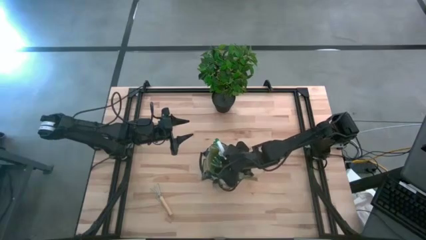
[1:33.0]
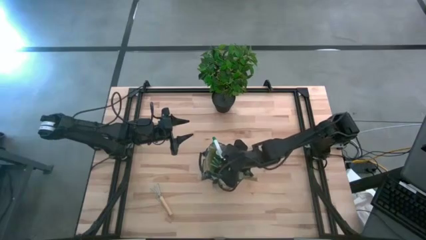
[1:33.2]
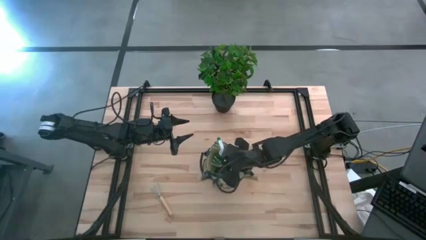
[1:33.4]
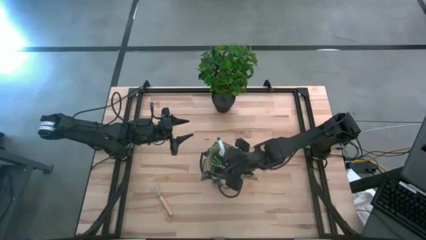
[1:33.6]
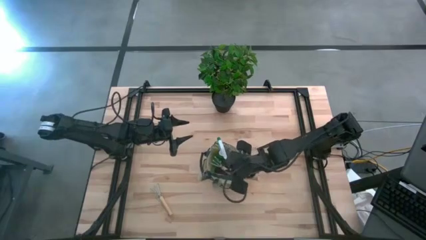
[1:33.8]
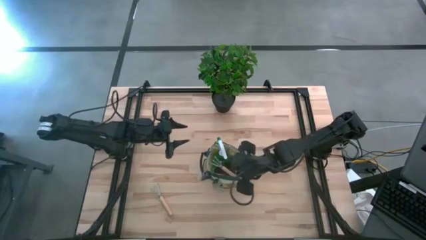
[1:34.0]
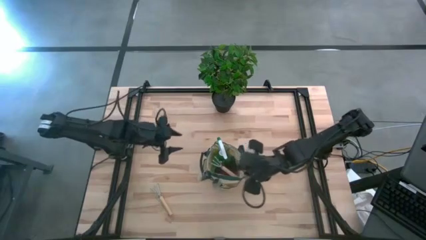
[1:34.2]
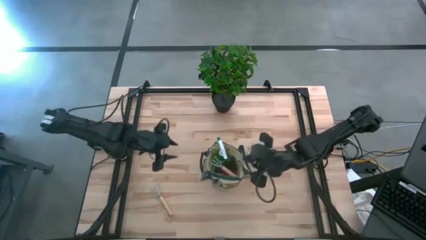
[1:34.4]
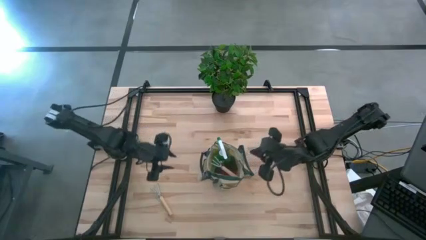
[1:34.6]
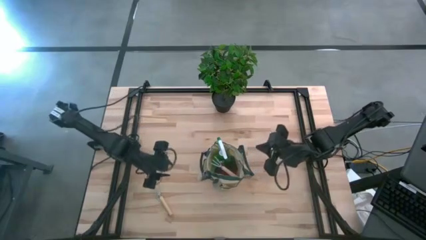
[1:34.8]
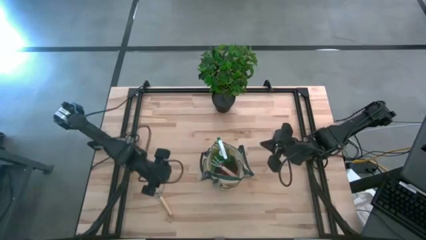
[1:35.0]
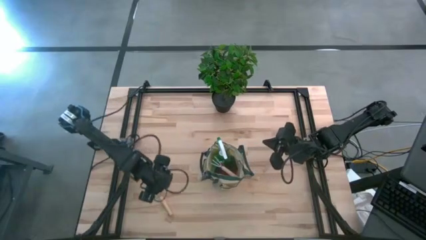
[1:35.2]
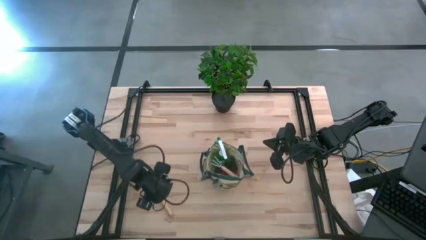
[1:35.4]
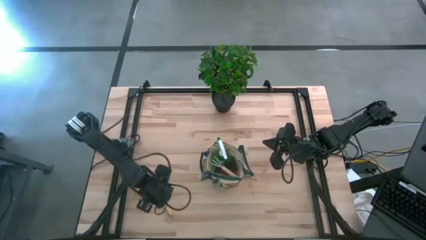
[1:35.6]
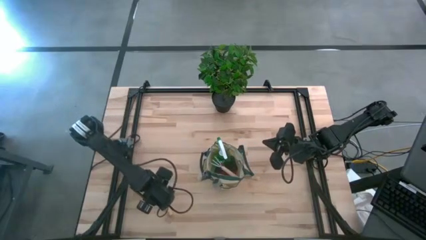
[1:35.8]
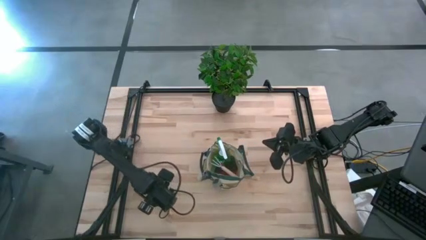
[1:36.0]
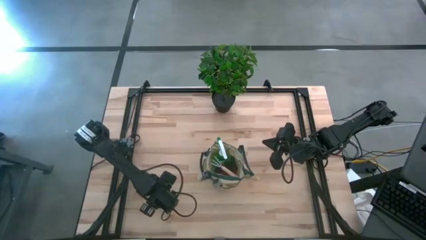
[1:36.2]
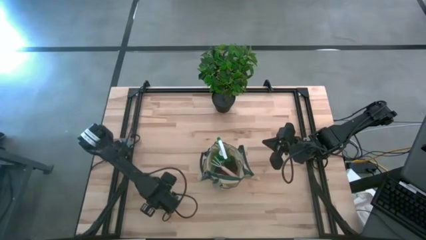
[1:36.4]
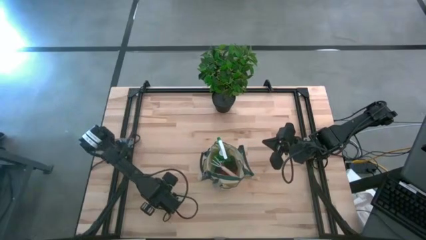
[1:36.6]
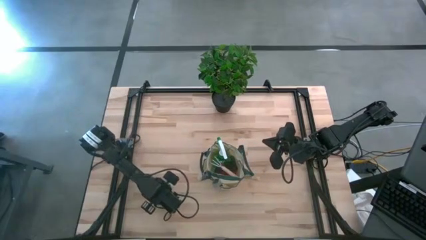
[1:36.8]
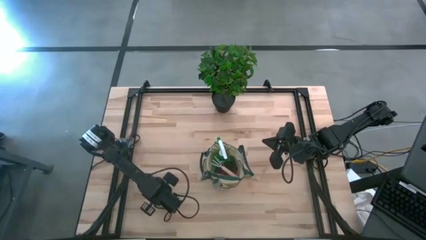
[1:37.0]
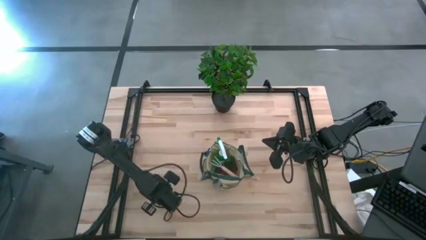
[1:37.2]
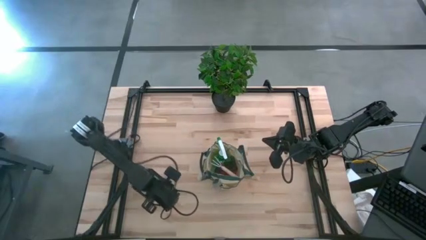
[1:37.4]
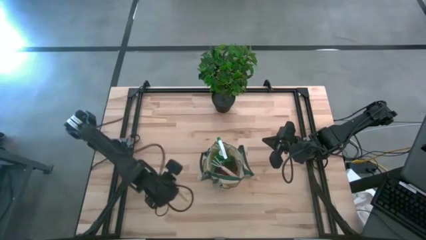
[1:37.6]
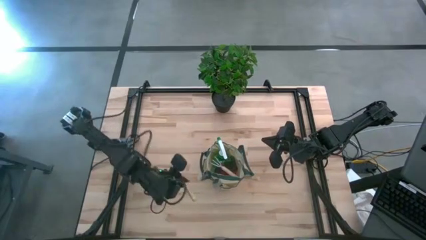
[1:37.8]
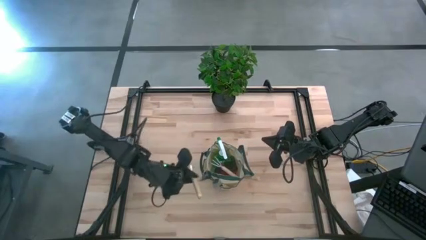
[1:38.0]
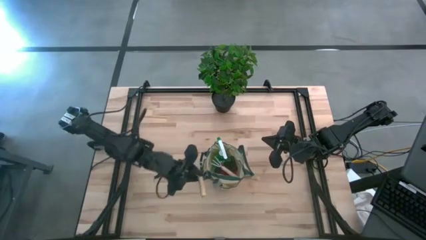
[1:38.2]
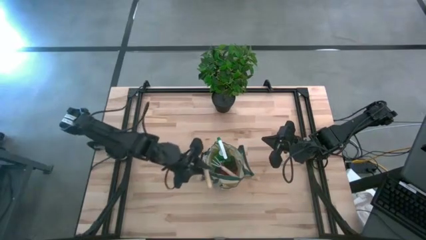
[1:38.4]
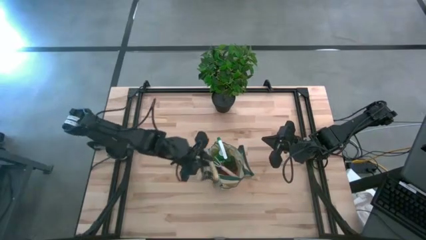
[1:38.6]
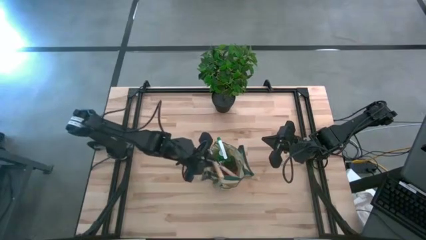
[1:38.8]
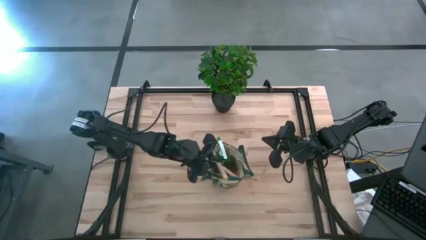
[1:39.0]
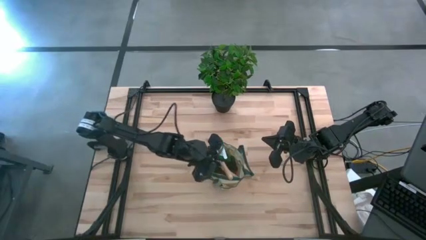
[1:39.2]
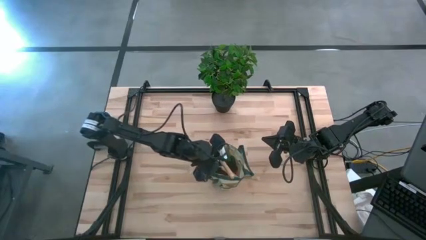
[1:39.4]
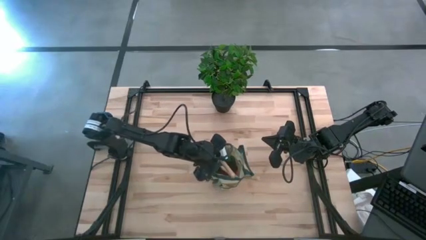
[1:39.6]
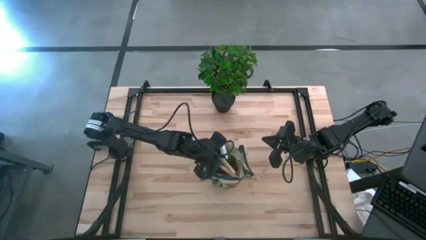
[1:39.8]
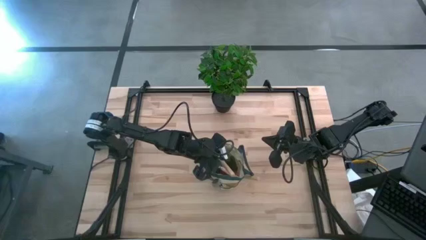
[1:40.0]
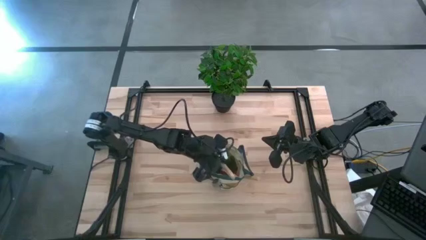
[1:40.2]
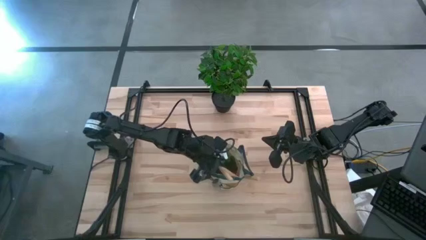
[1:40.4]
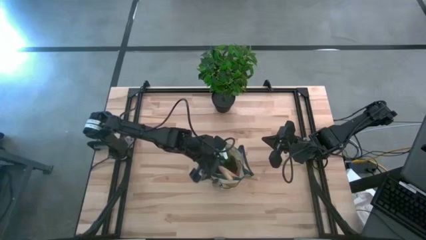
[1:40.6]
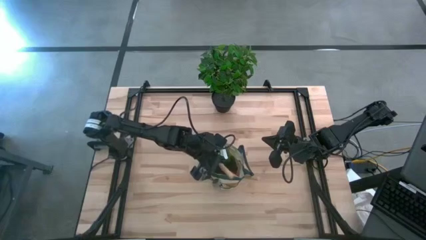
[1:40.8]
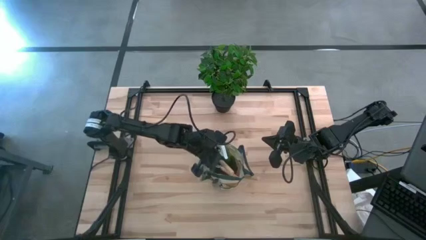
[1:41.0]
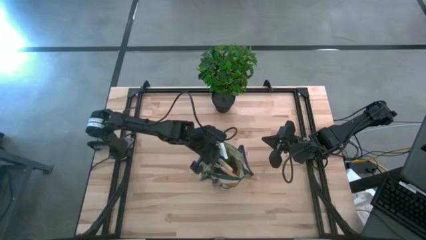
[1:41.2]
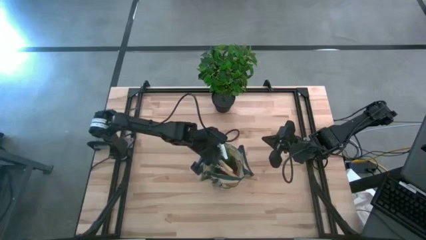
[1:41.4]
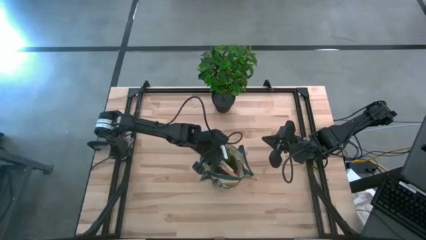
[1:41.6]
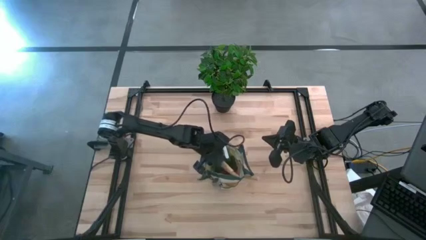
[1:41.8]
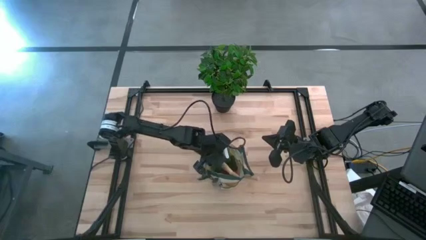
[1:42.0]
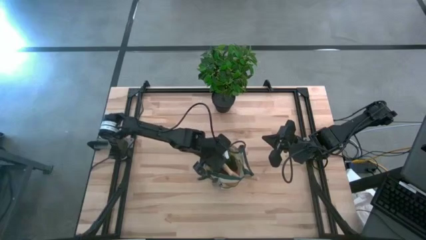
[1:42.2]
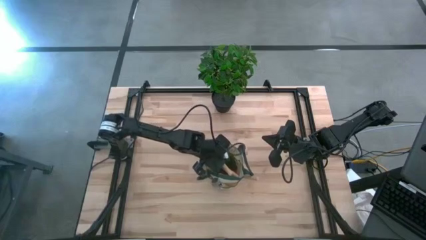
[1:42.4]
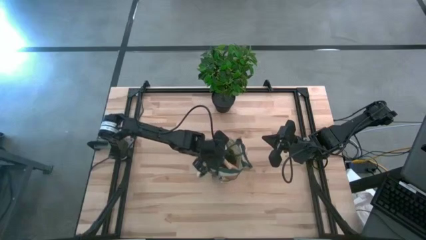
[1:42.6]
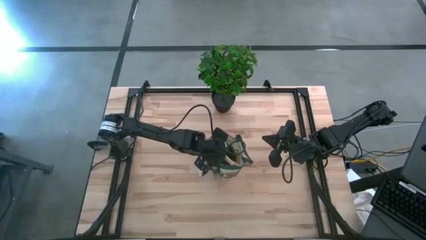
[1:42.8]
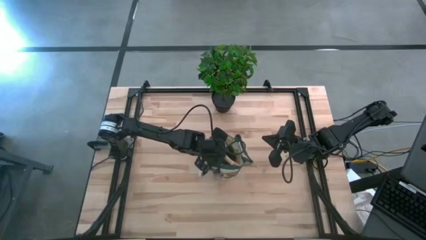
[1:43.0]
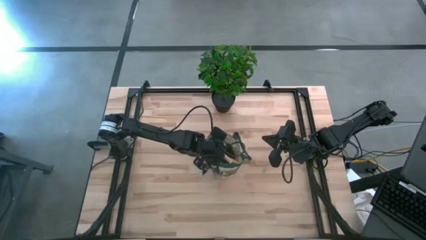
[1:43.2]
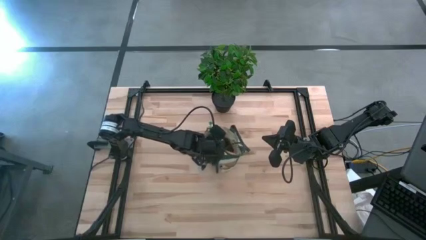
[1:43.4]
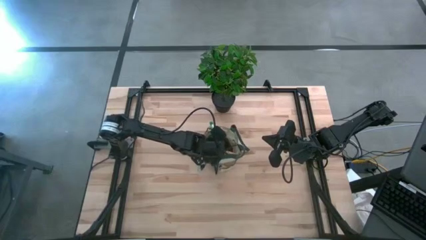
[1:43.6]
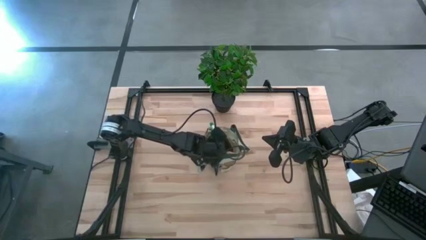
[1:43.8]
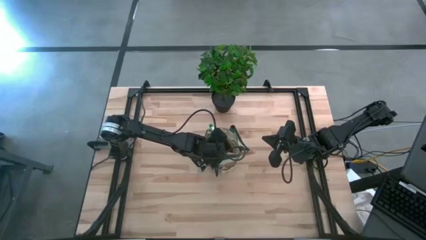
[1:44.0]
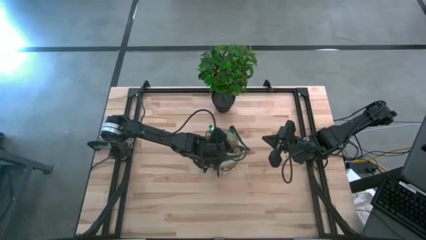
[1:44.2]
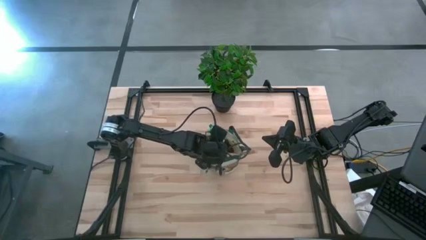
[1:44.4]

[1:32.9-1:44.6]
Task: Pick & Place Garden tools in Gardening bag
Put the brown hand rake into the green gardening bag

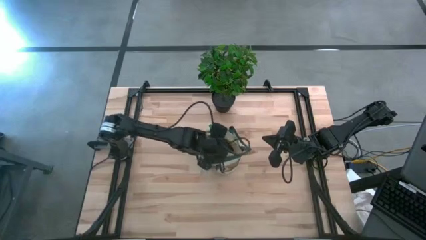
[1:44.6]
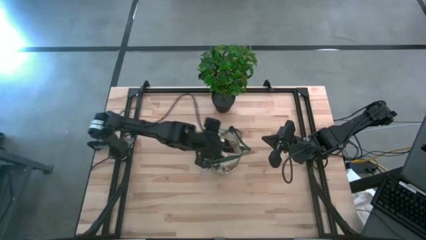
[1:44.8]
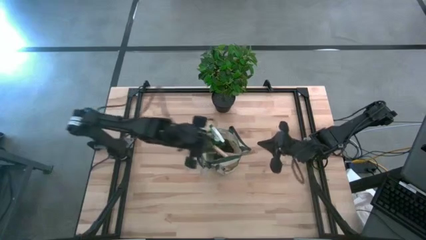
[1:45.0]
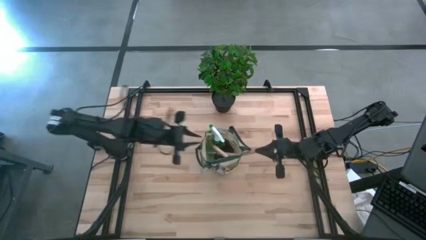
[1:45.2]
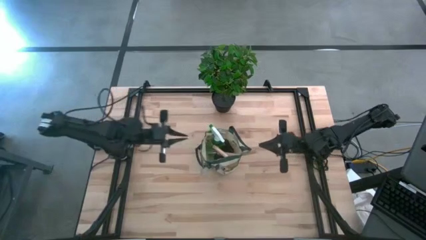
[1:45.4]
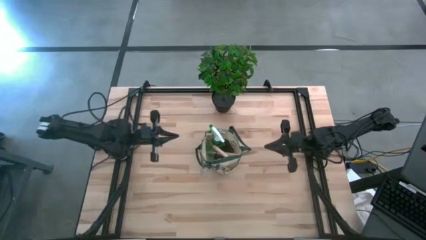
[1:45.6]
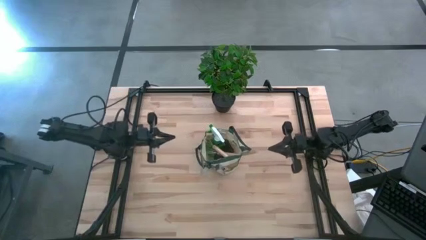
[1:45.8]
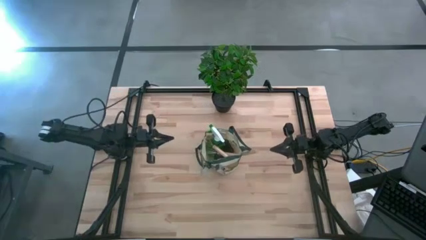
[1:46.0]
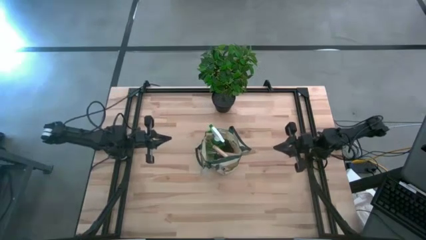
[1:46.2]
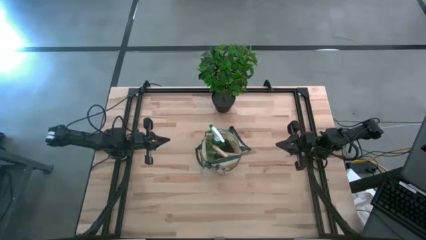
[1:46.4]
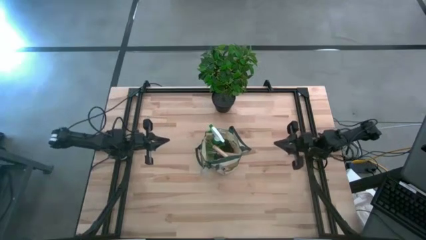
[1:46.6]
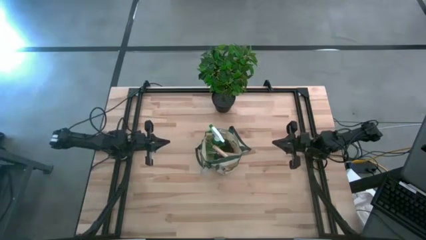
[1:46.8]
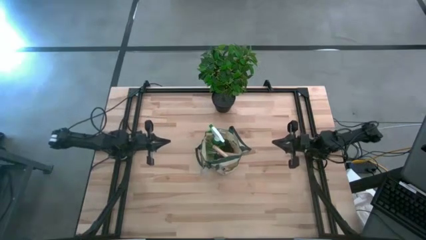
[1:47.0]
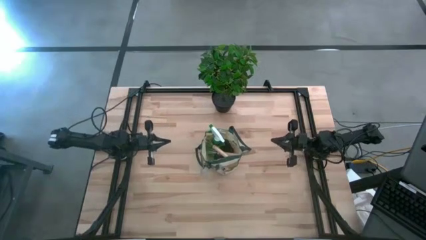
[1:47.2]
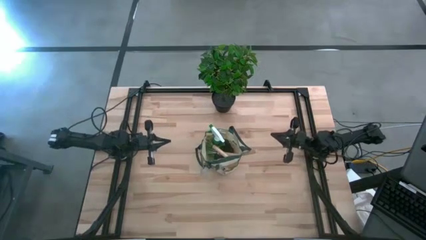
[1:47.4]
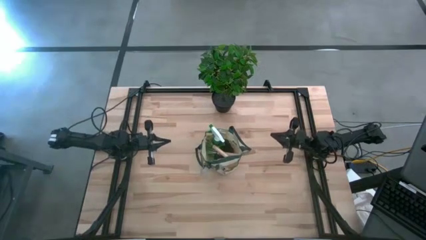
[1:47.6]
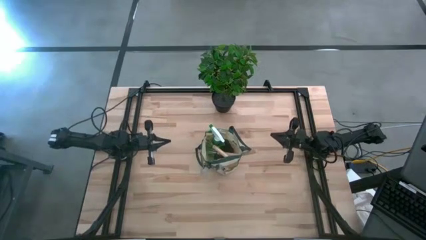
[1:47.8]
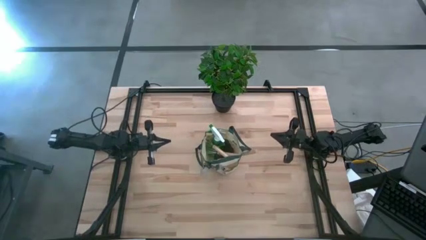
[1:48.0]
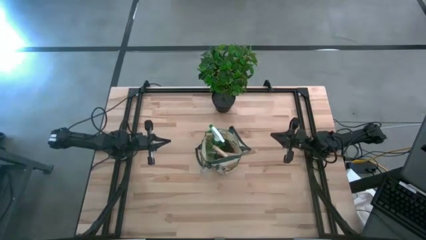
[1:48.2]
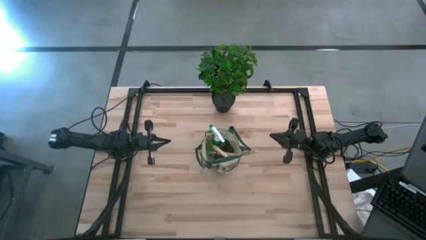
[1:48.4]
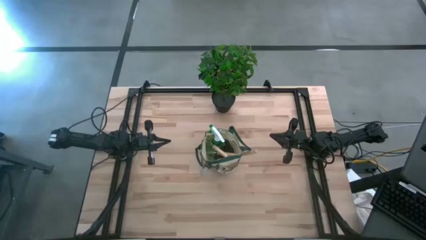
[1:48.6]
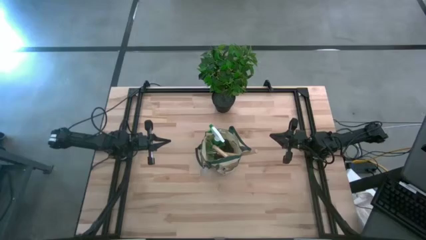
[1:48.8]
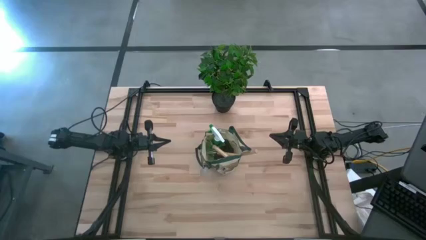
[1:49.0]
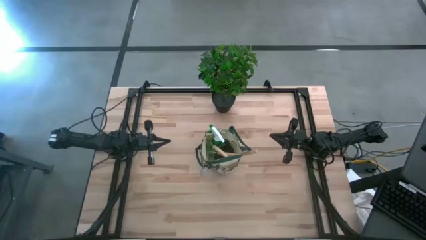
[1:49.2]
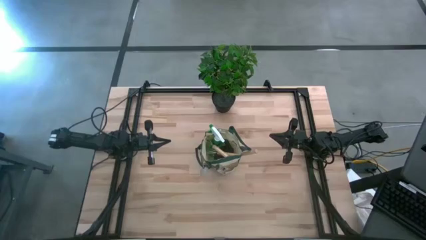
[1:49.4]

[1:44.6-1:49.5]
Return to Home Position
